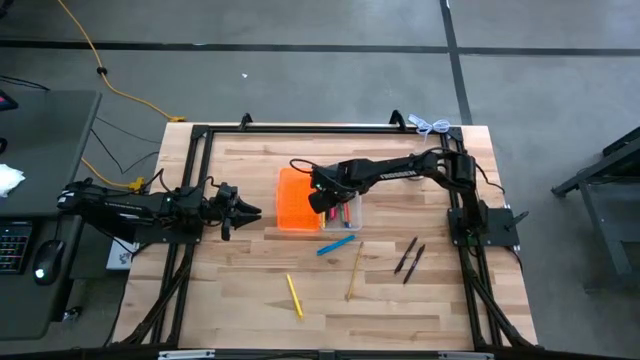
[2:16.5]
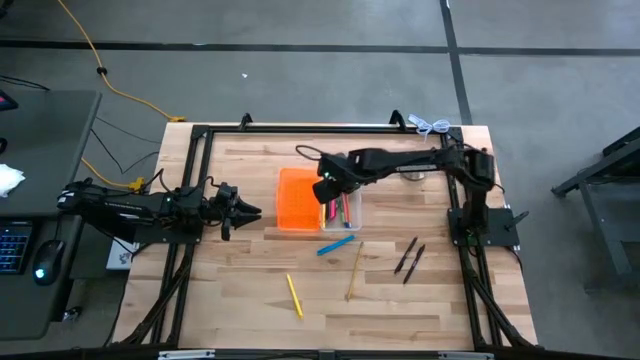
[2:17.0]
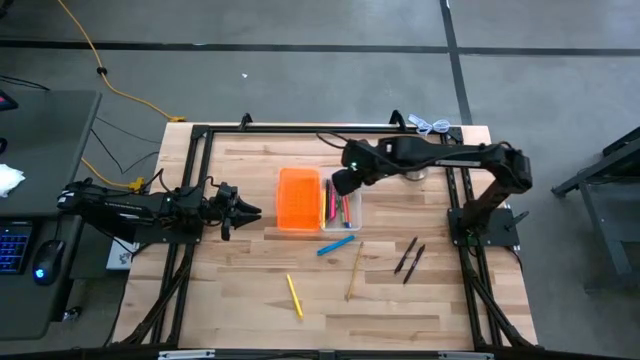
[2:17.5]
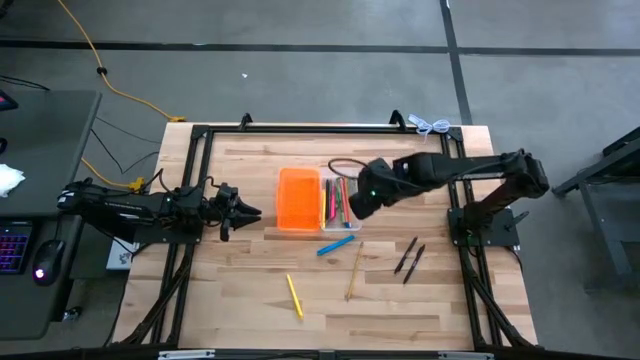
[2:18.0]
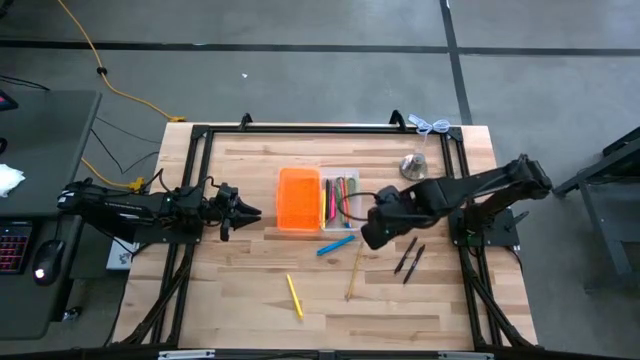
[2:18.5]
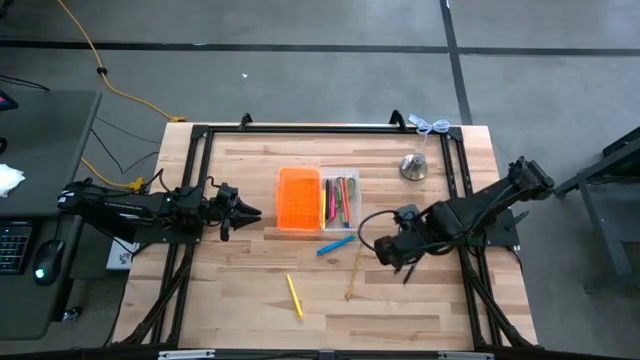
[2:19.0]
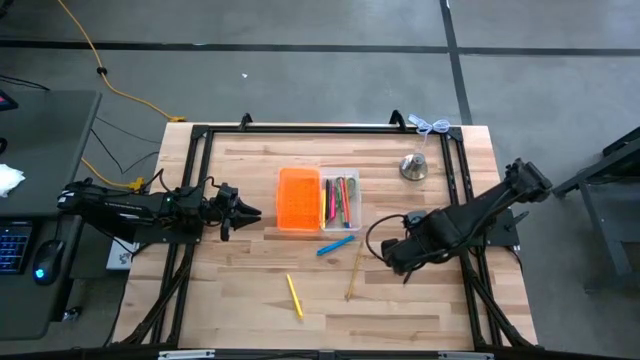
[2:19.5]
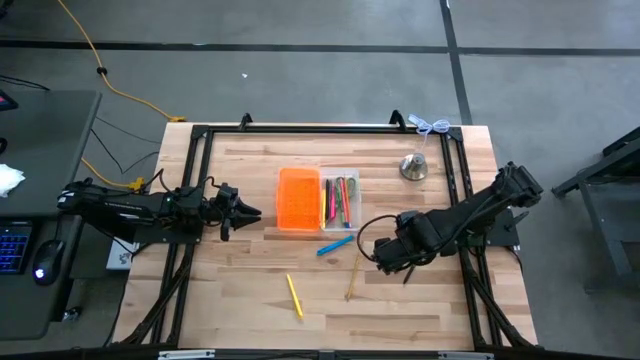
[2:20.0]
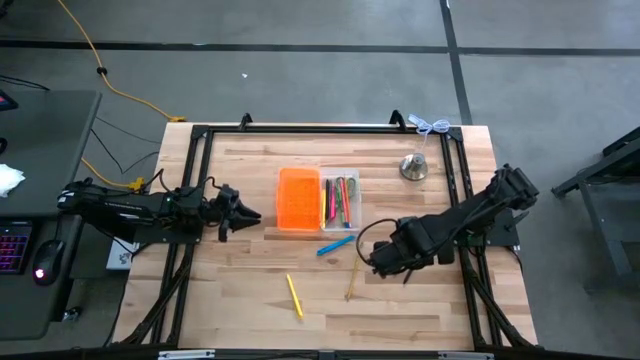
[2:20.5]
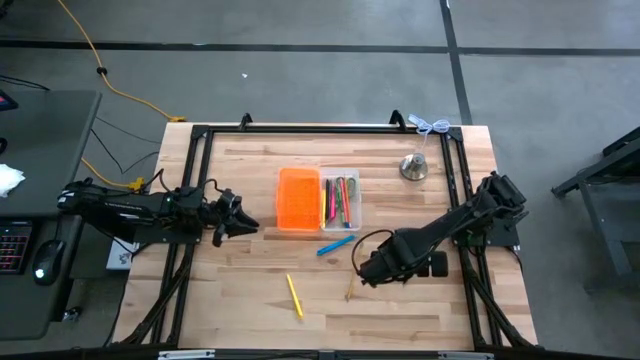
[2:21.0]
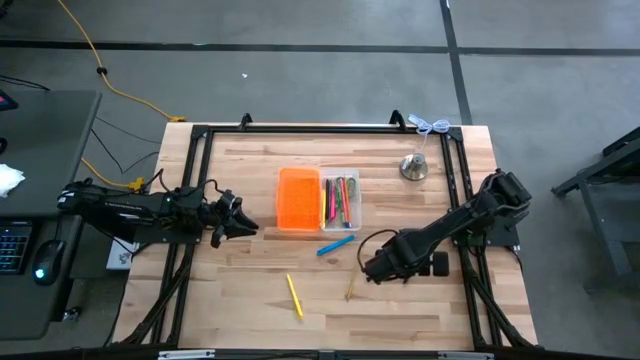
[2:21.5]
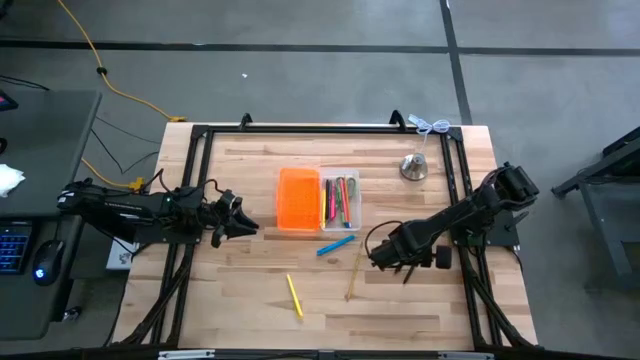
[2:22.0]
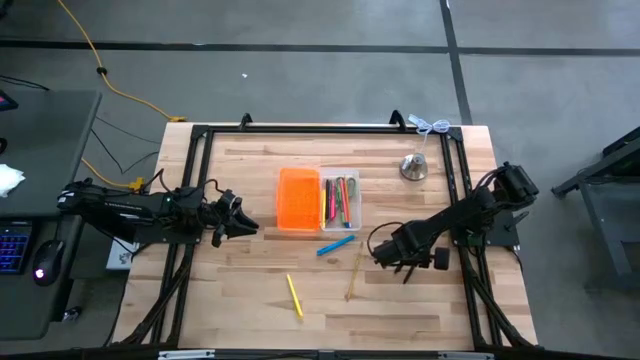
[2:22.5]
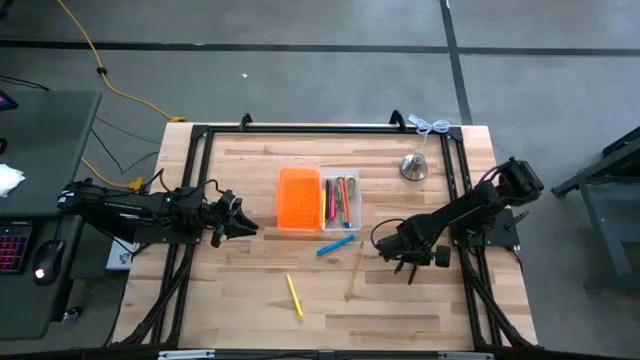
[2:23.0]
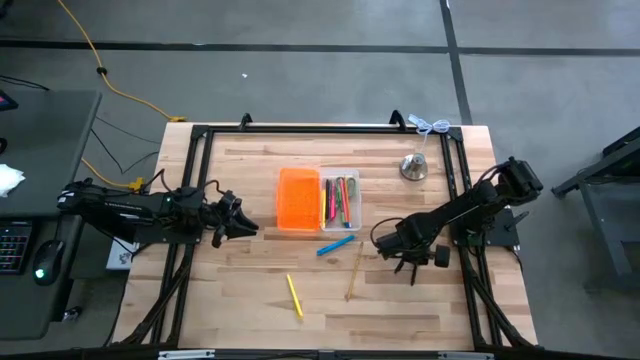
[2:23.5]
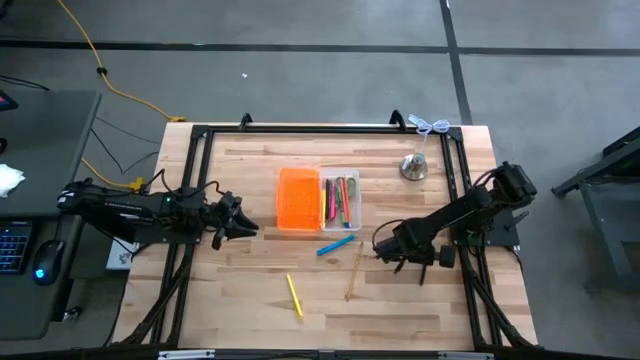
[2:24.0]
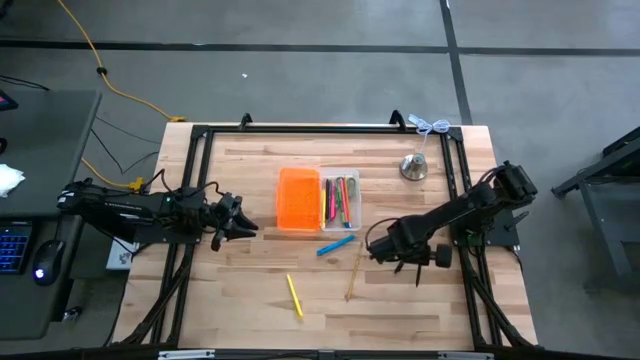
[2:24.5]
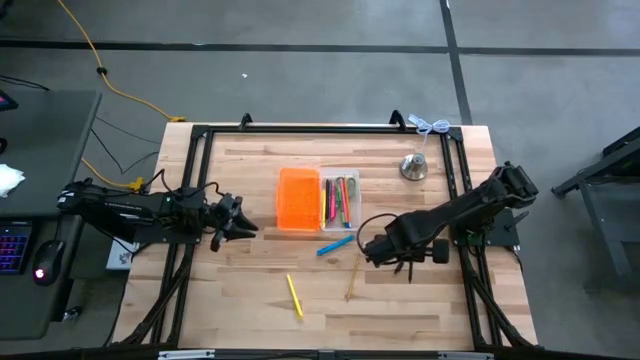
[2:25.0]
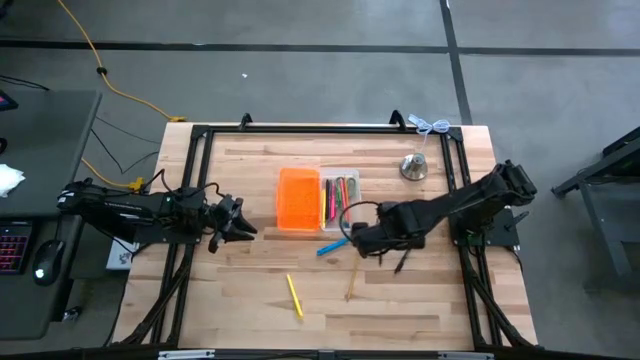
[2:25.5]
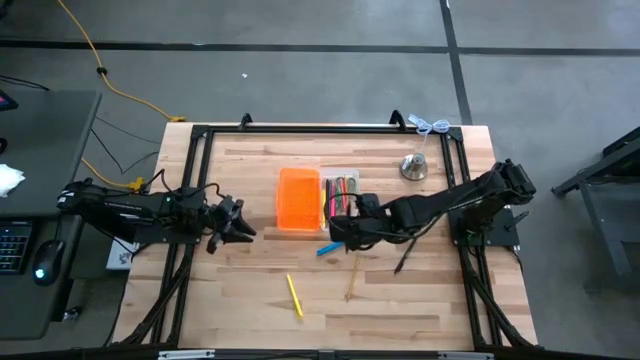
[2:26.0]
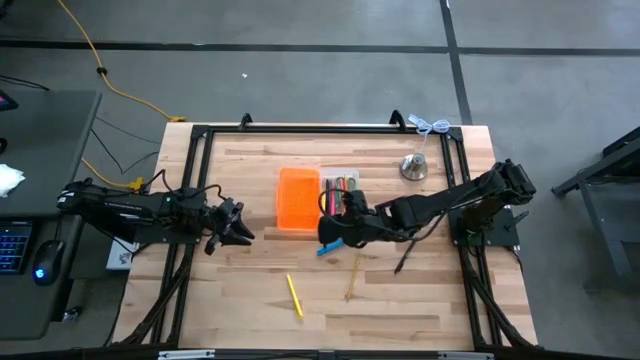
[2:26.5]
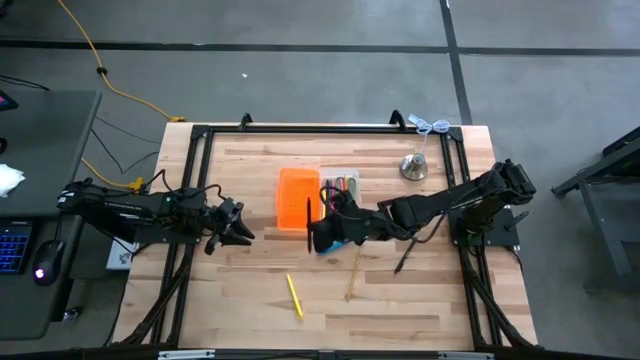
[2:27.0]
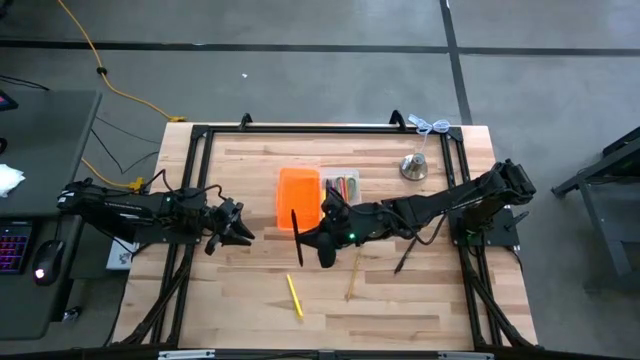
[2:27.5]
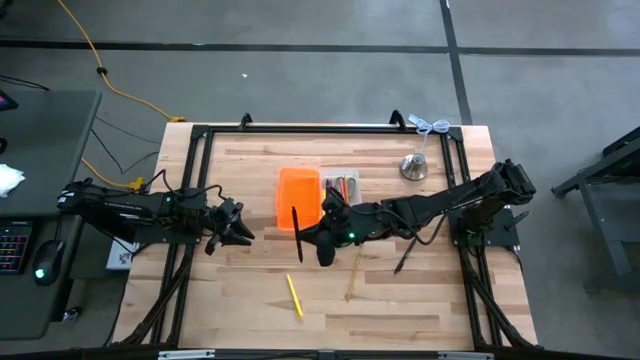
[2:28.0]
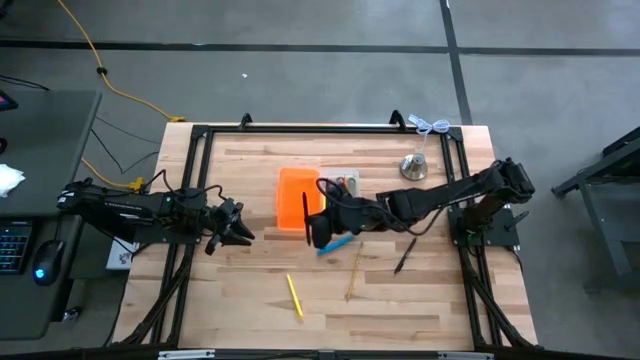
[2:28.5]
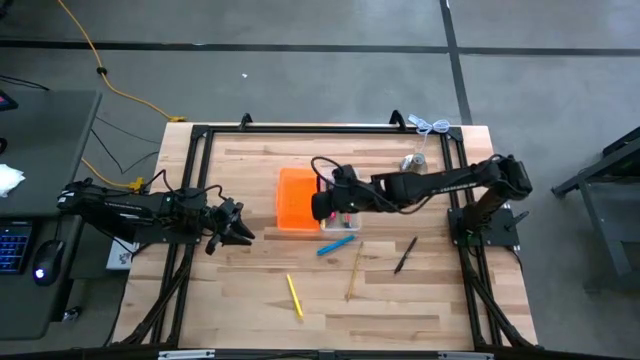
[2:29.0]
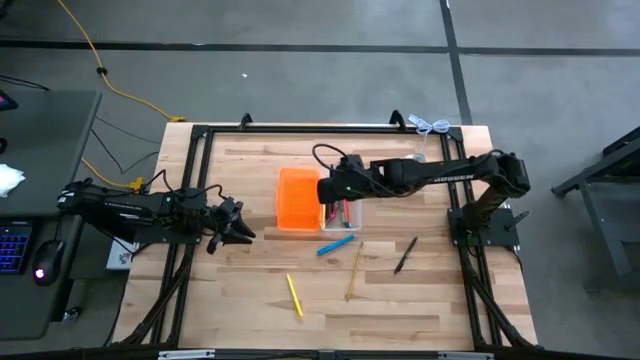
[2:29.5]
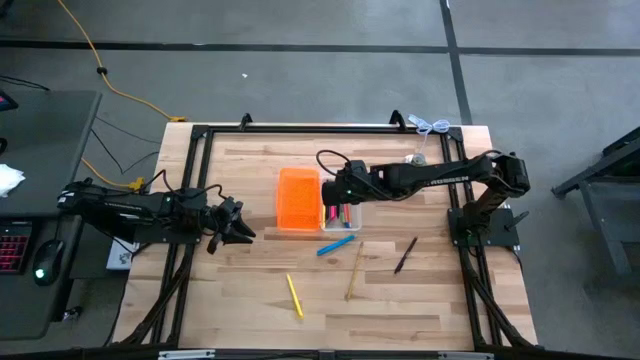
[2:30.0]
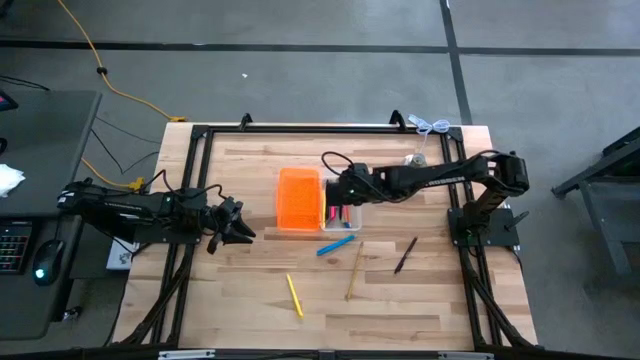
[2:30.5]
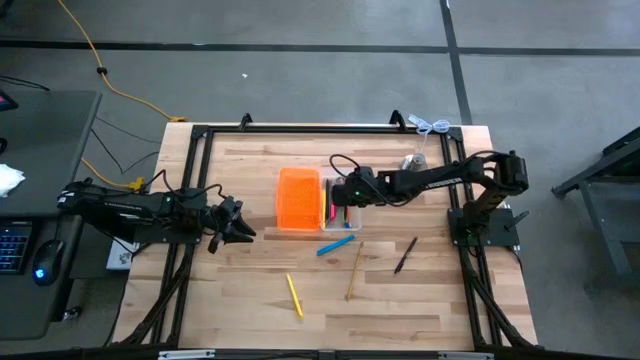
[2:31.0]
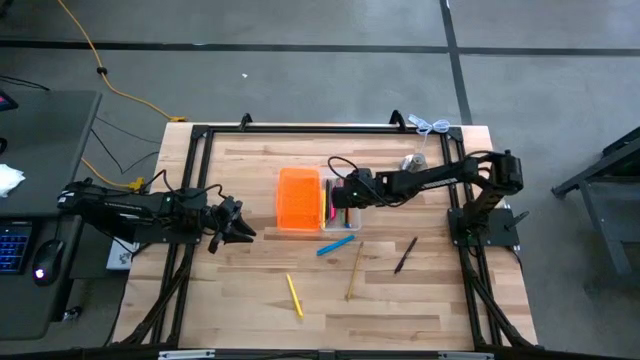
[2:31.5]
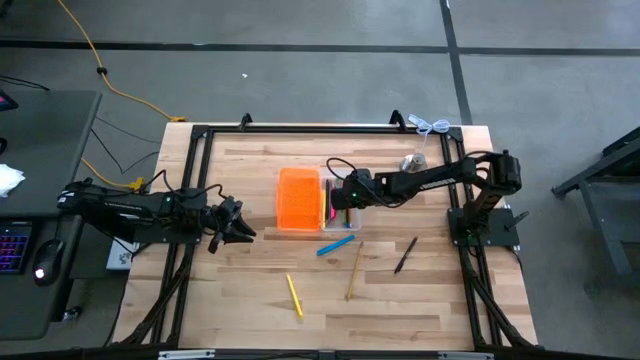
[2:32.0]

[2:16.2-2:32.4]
Task: Pick & place school supplies into a supply box
Put the right black pen into the supply box

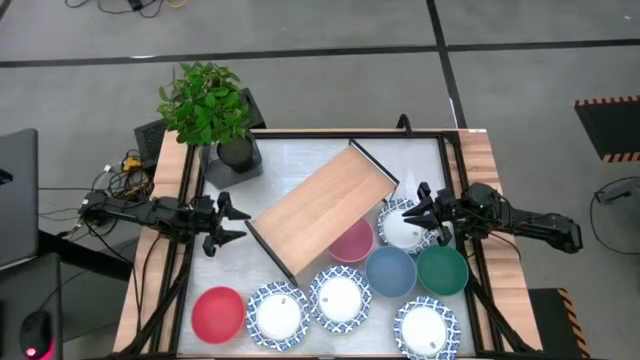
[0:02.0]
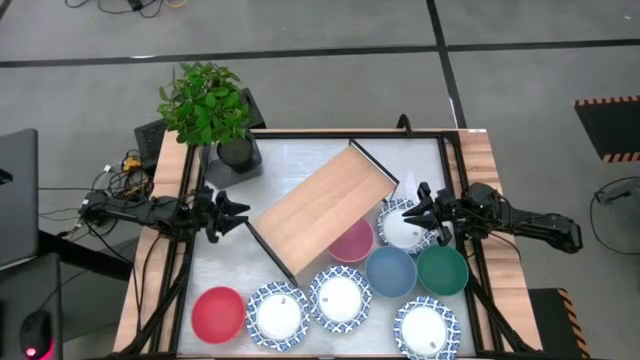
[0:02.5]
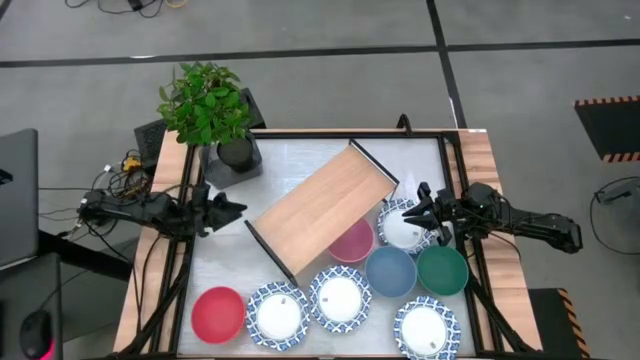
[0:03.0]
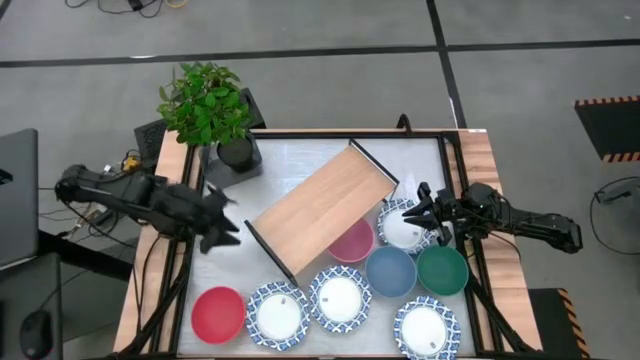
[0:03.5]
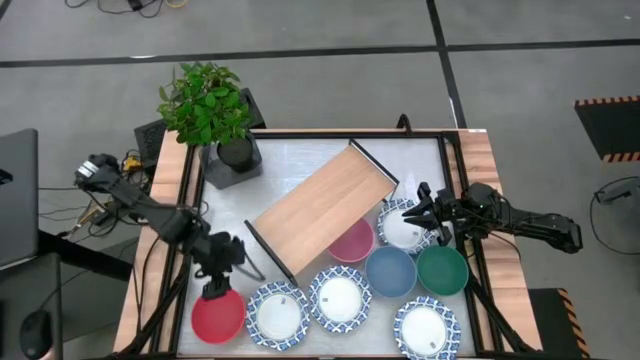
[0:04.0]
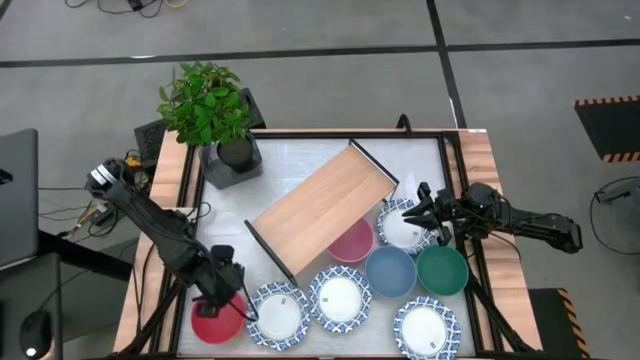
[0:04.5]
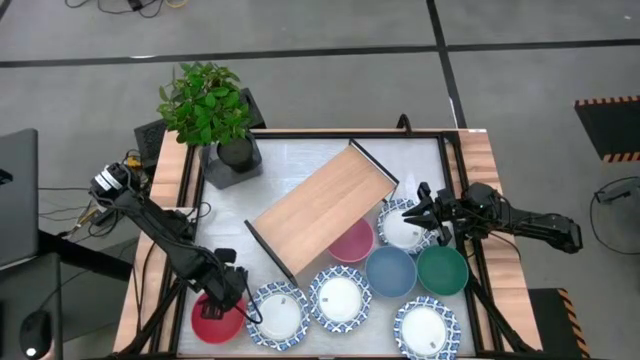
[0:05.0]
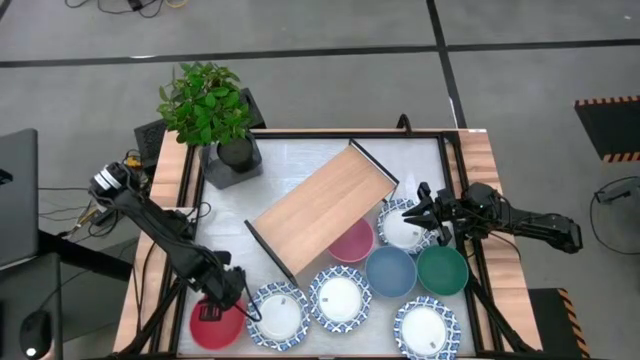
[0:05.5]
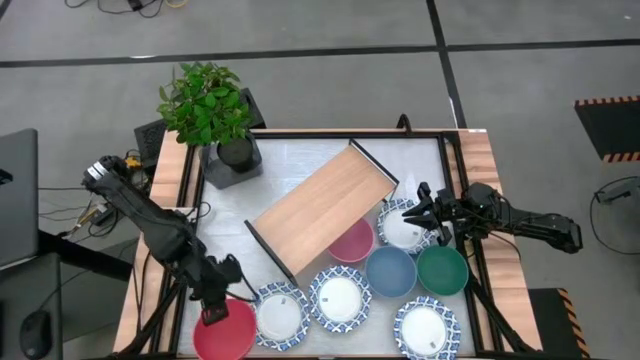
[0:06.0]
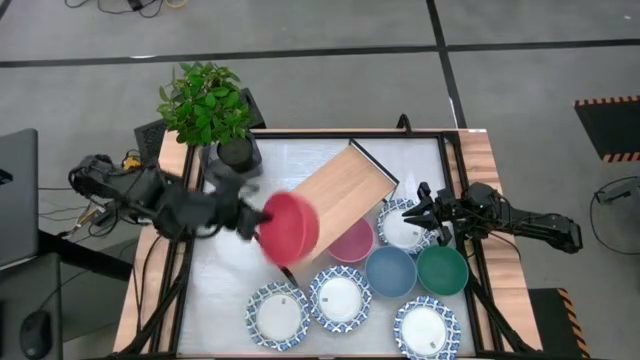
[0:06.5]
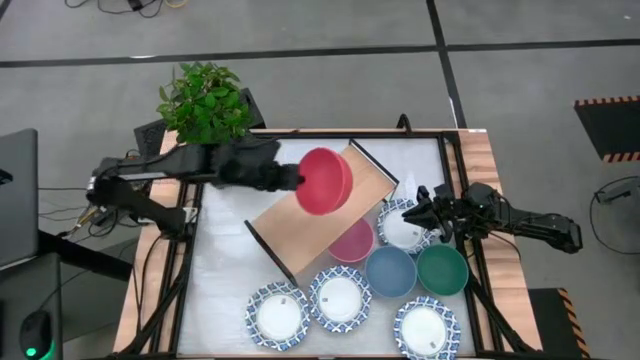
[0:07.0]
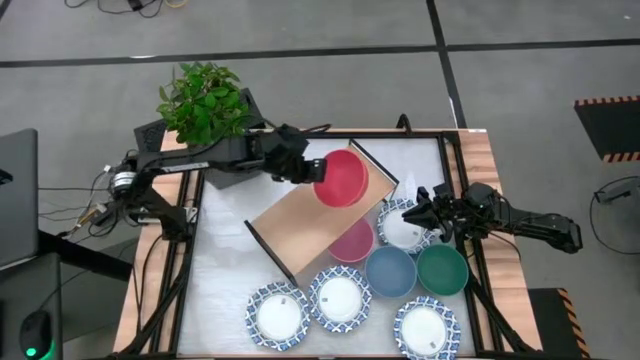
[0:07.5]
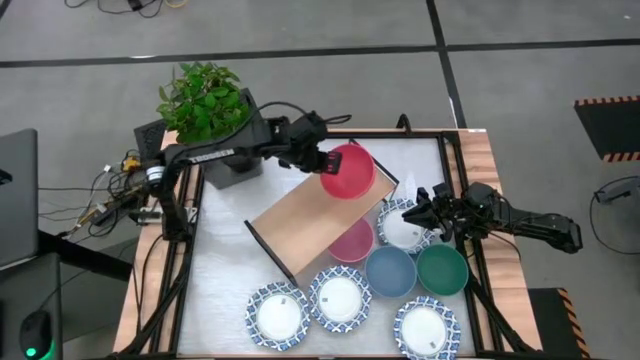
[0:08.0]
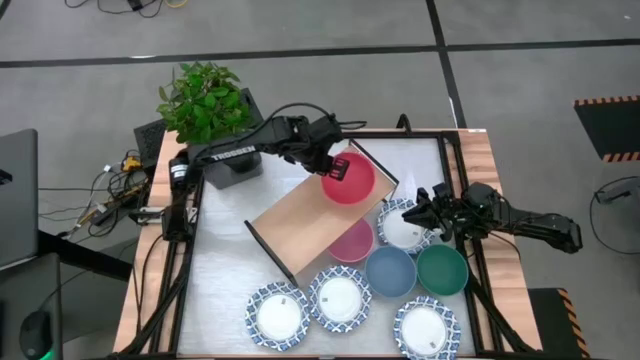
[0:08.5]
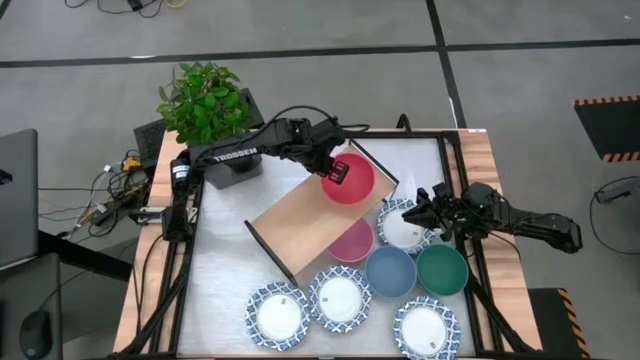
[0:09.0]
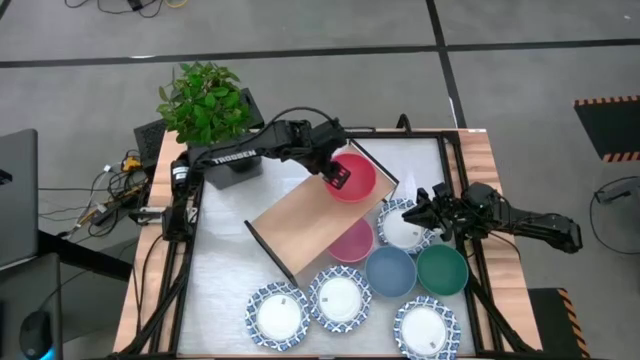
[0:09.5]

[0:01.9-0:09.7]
Task: Place and stack bowls onto a shelf
Put the red bowl on the shelf
